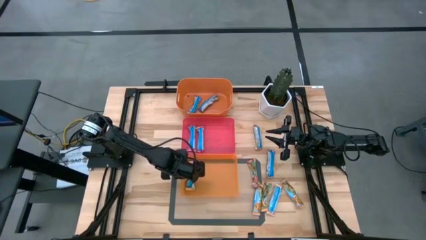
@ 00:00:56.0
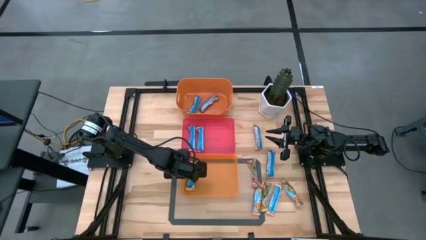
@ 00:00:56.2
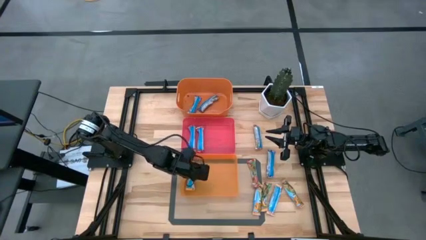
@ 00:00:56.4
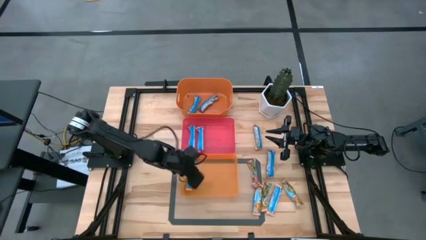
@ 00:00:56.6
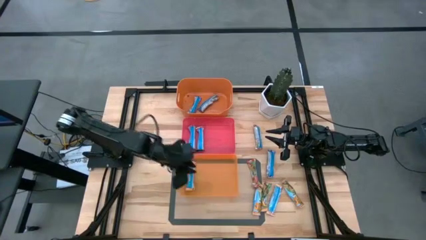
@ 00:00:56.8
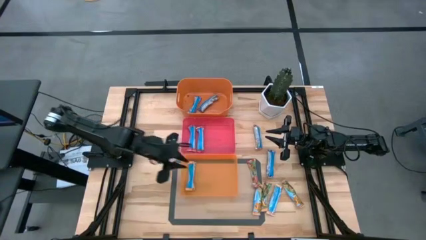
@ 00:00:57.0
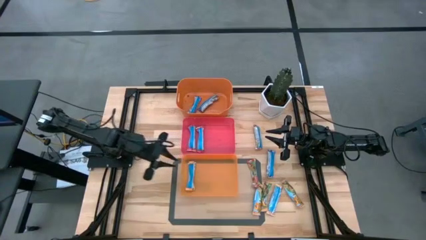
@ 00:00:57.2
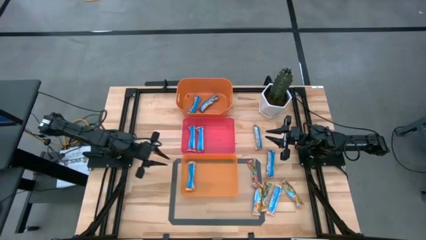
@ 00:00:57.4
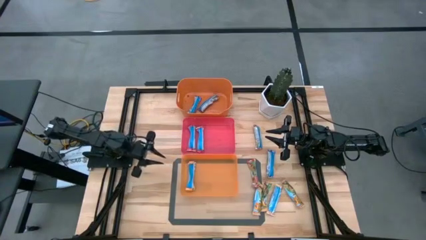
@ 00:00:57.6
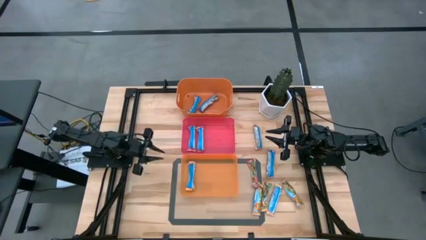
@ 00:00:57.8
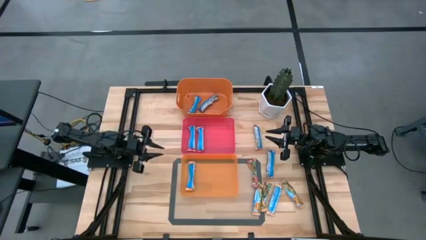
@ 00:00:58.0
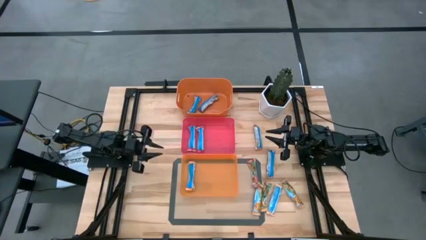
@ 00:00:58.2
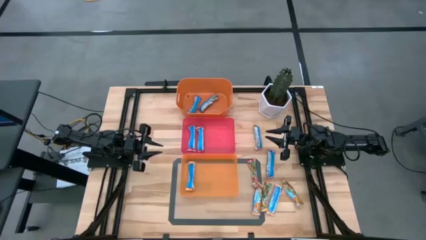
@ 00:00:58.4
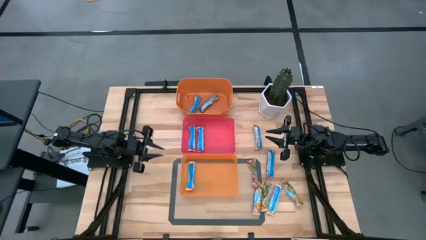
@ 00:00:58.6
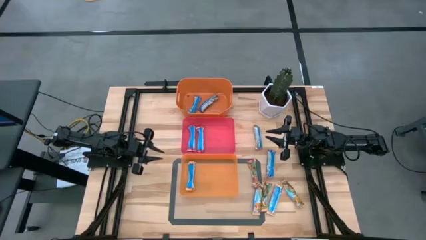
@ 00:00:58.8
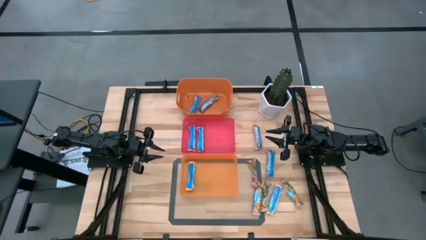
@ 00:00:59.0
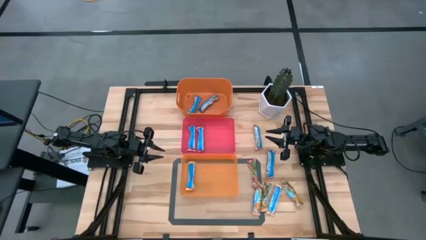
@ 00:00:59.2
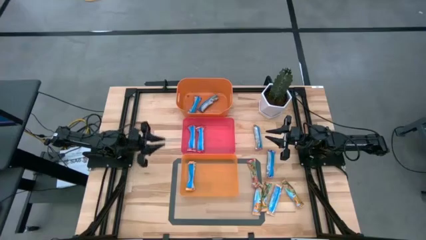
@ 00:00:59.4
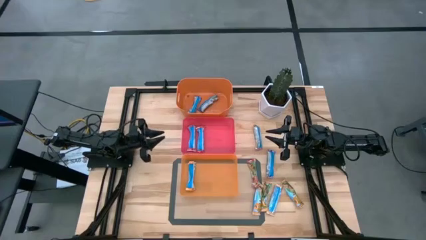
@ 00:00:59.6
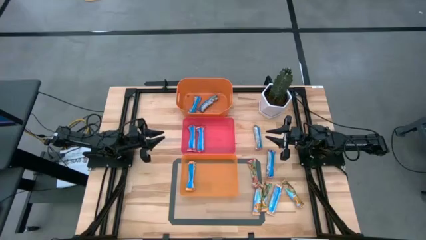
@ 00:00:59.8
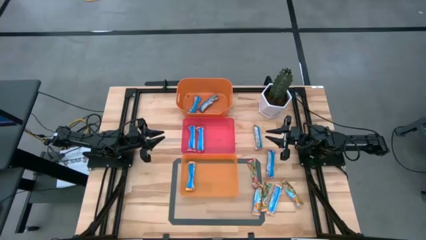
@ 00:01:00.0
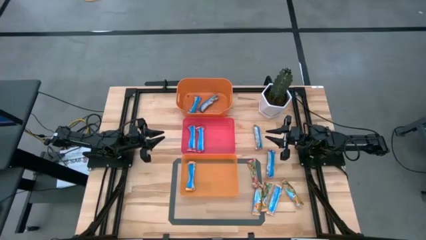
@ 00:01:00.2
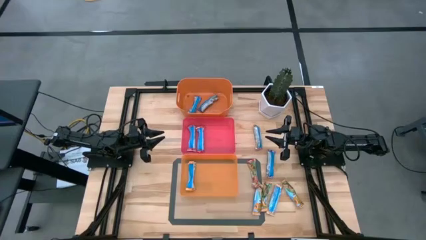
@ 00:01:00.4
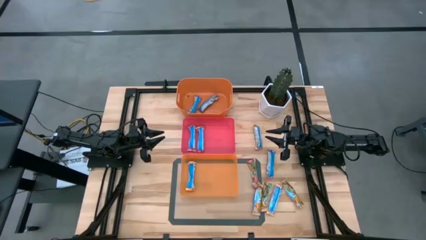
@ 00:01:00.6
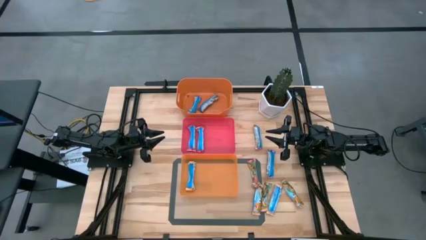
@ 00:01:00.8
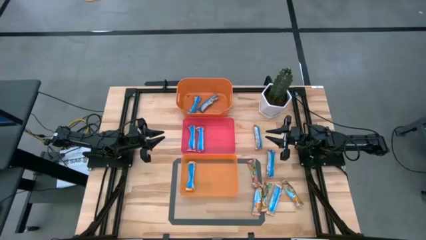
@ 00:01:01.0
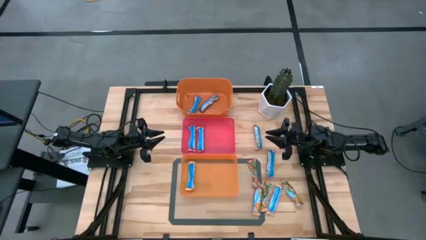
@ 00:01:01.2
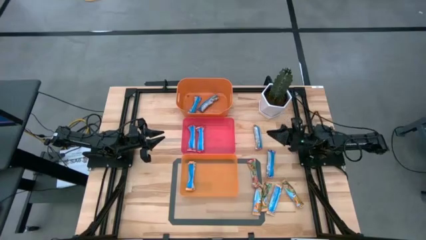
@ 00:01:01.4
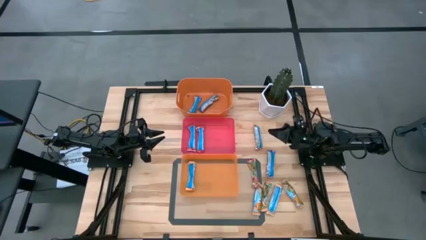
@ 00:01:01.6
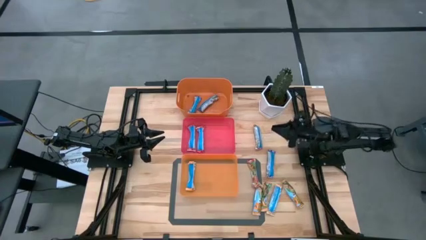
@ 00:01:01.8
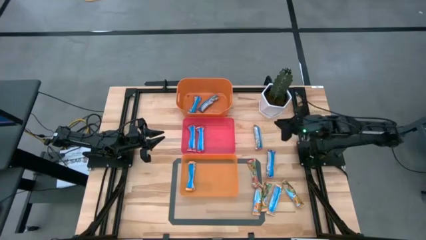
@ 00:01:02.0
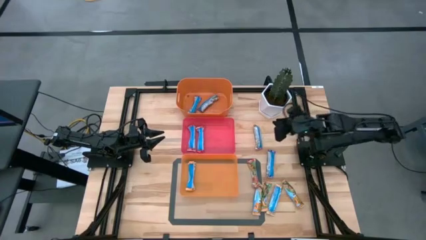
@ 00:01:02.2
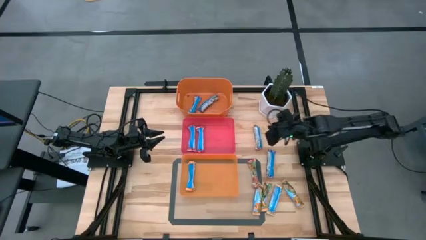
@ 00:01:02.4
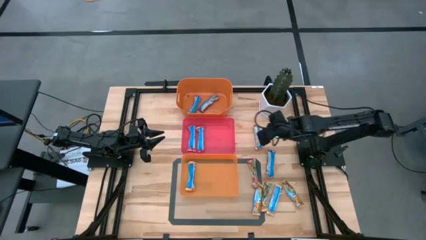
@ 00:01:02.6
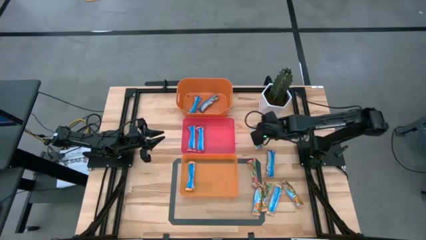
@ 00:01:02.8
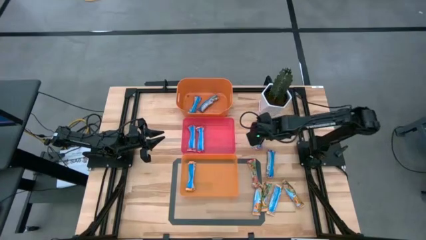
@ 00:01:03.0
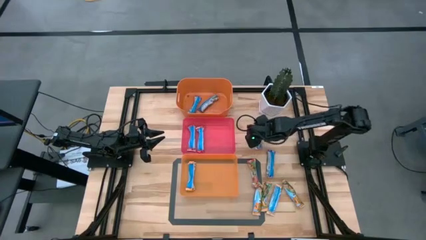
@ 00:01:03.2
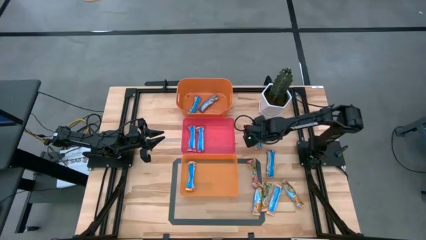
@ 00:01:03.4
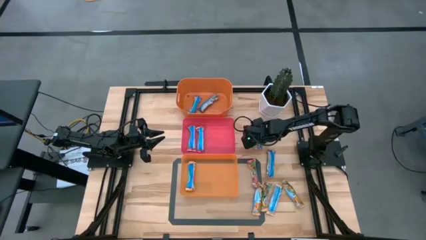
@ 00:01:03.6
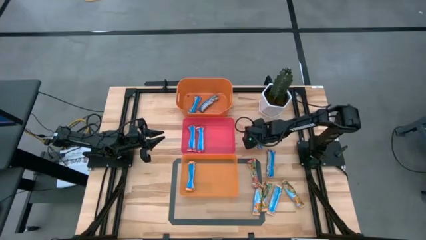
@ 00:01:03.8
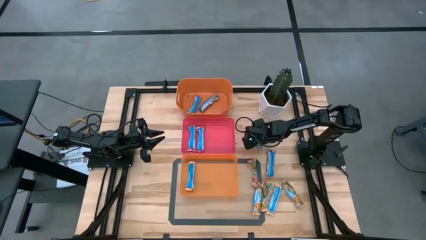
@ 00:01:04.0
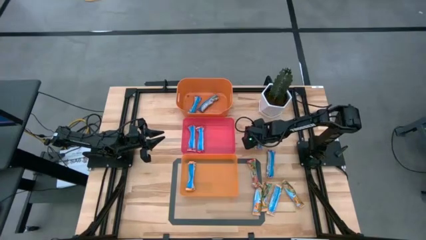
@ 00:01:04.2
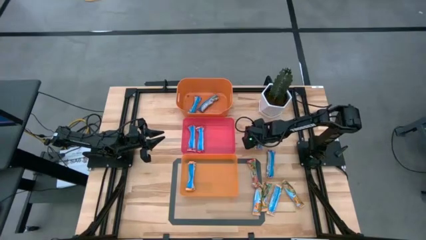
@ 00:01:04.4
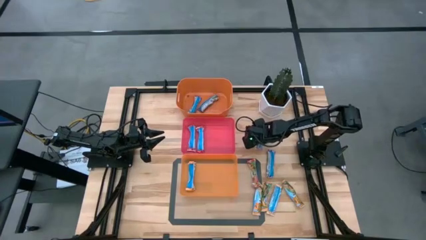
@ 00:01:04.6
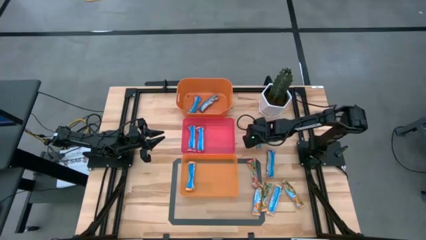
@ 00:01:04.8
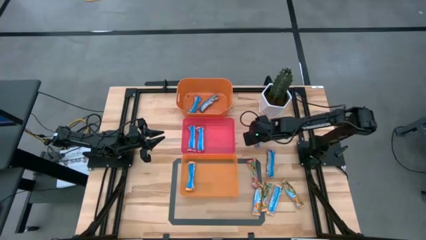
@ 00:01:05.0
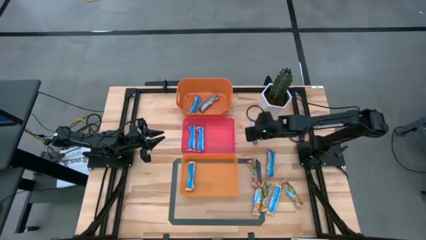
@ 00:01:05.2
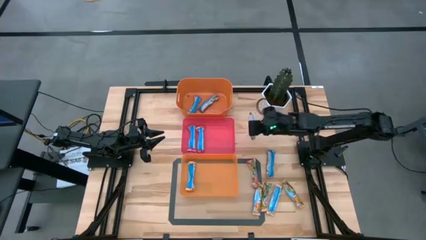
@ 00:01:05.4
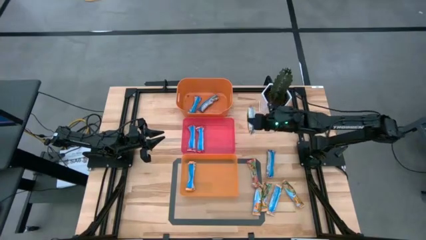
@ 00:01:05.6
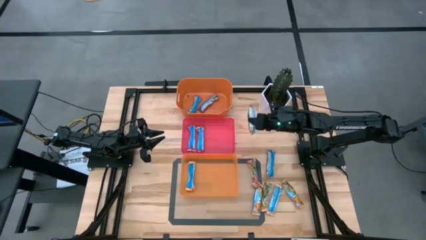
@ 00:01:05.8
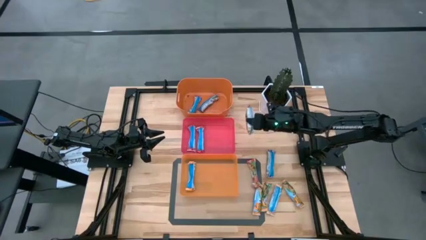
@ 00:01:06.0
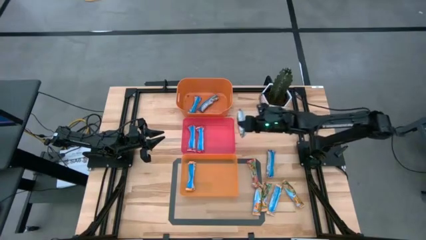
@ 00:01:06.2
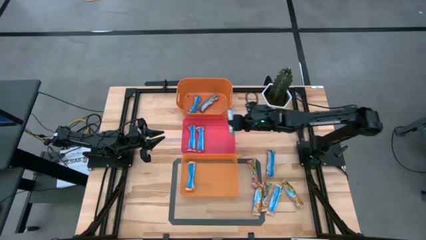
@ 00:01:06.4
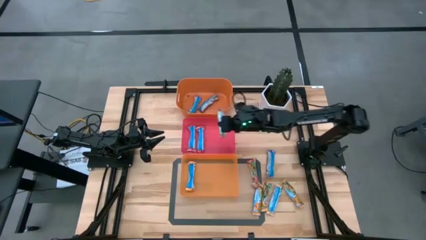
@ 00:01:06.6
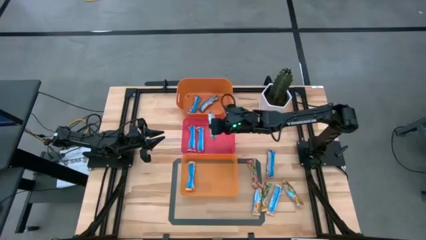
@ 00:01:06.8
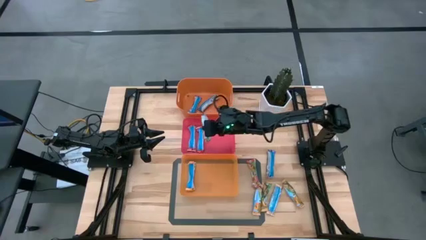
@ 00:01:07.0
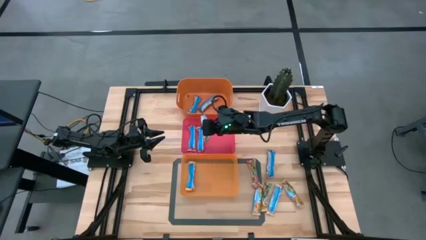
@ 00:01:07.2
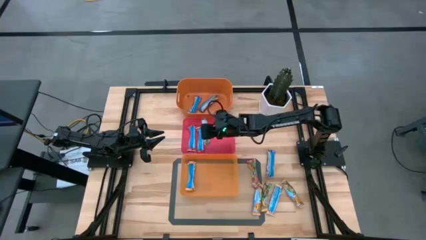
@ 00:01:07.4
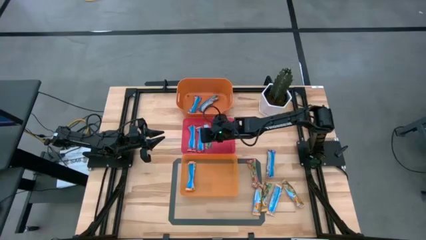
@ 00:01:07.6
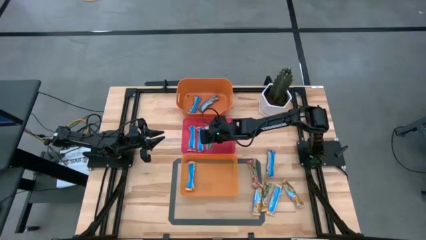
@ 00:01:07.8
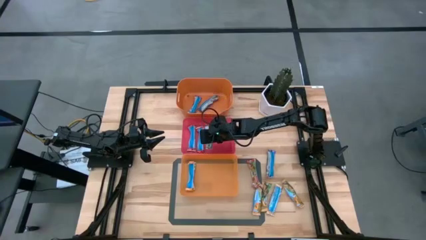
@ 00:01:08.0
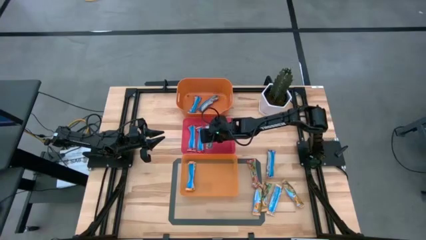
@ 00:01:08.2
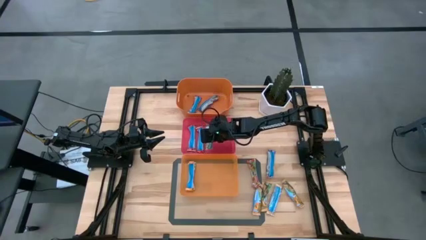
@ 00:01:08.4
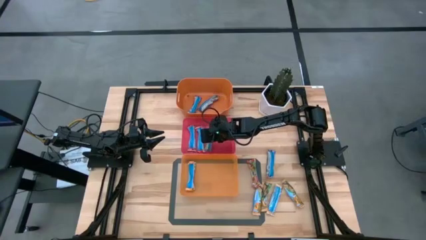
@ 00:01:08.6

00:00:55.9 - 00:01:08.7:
Task: Pick and place Granola Bars by type
Put the red granola bar into the red bin

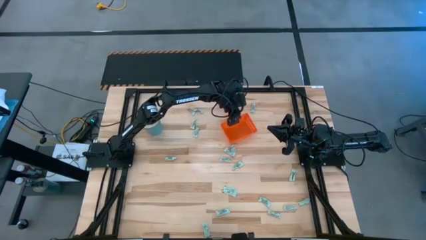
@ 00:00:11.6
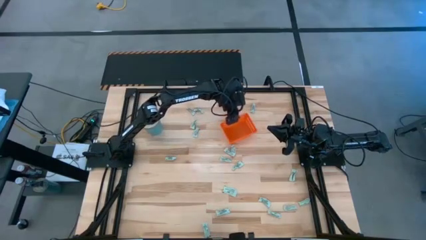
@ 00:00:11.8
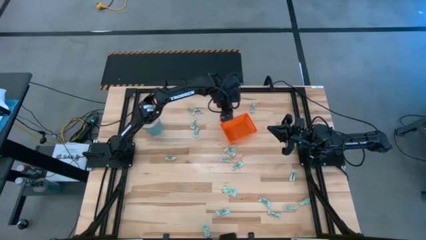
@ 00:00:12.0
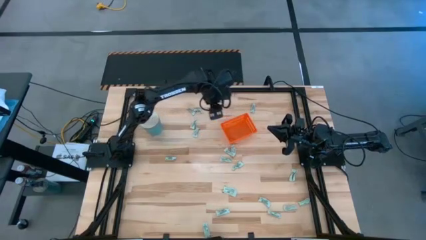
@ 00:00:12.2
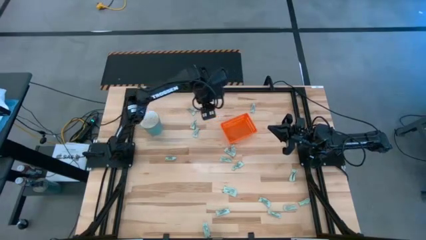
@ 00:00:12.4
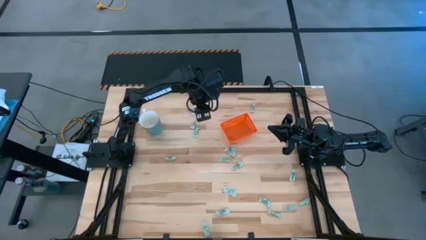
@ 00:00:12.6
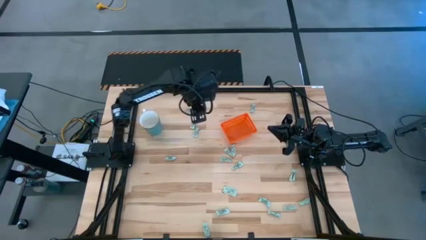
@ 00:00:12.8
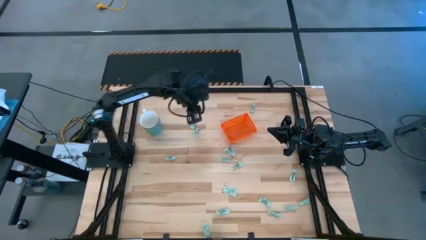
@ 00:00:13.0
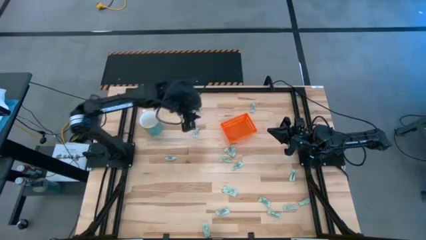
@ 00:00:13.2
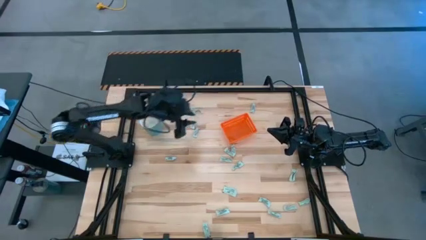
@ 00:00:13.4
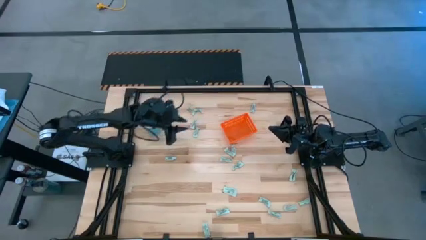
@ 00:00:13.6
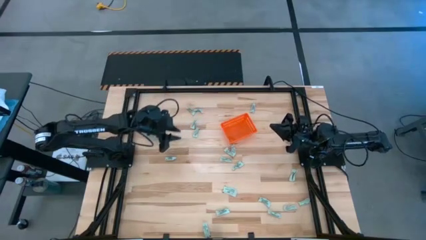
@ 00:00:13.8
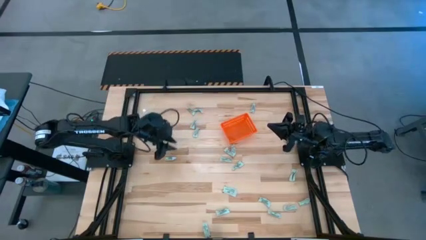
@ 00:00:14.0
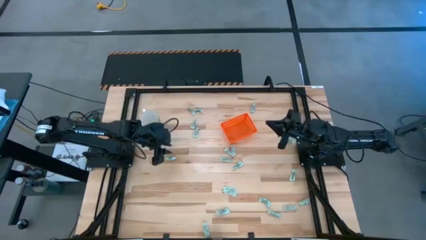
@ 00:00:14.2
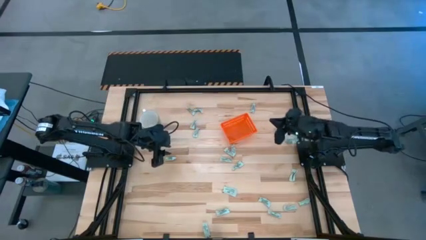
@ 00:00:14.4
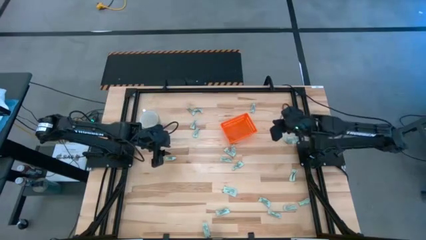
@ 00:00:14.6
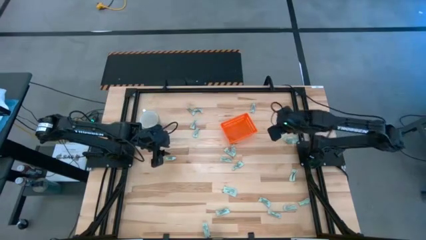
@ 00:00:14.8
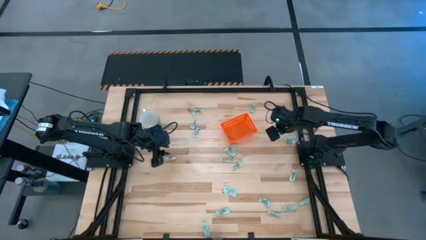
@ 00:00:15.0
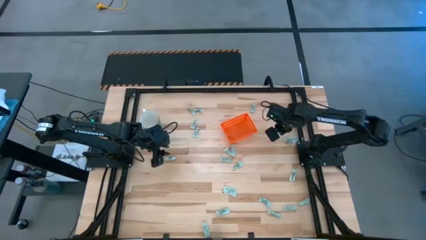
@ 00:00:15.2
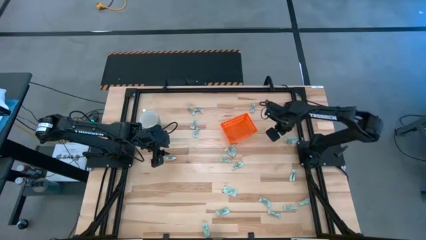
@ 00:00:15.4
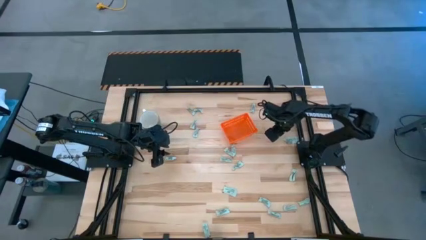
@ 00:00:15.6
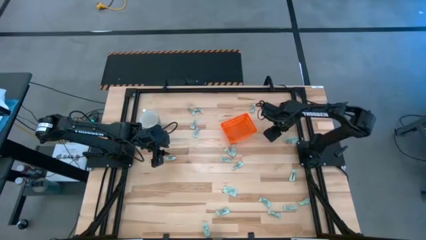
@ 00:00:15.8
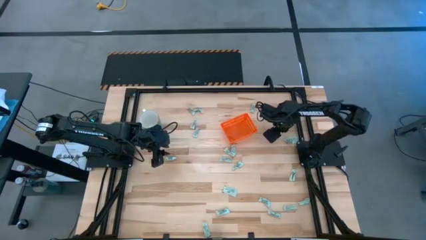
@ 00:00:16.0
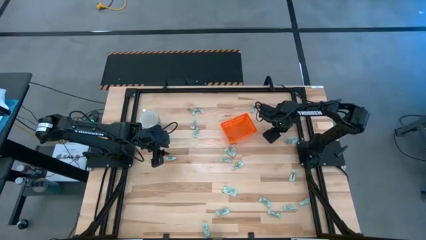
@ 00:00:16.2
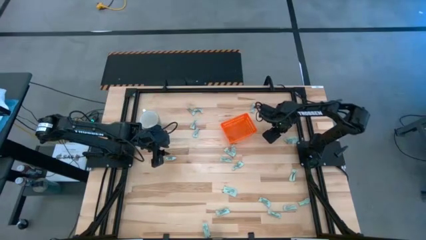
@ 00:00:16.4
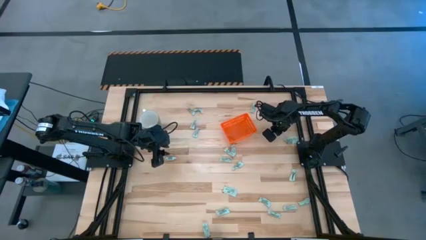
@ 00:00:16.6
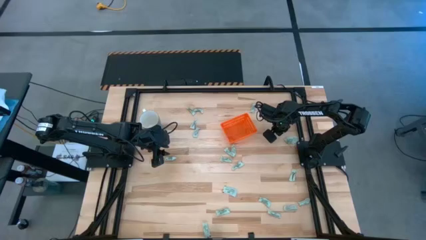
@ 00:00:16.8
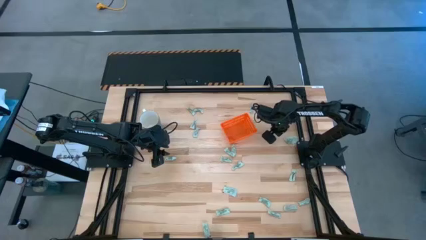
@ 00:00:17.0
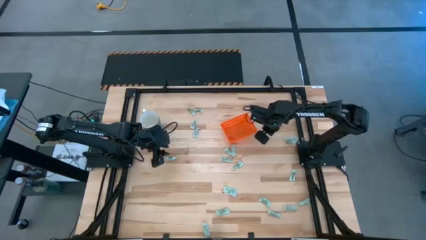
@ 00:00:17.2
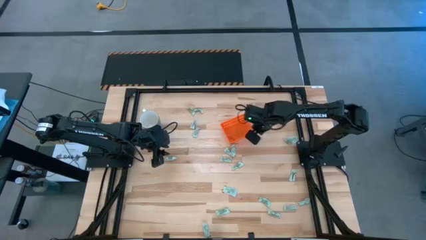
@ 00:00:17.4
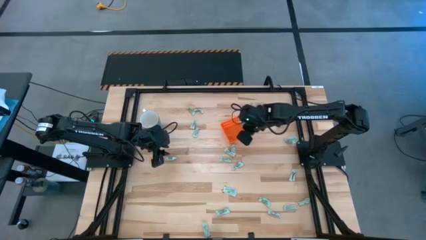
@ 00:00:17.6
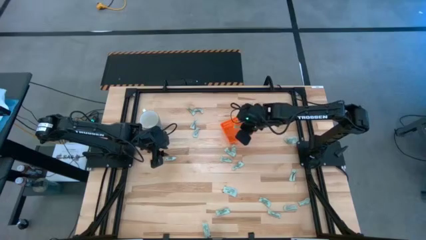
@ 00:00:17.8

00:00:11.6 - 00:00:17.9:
Task: Pick and place Stevia / Truvia into bins
Put the stevia packet into the bin
